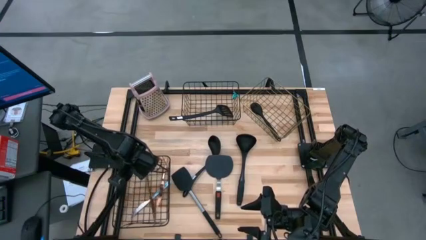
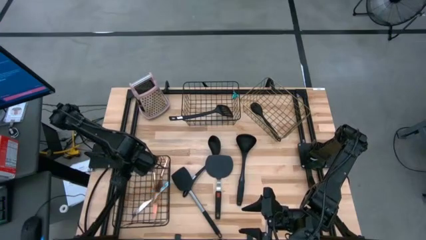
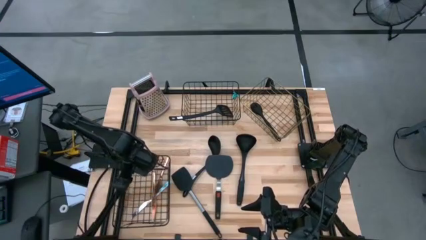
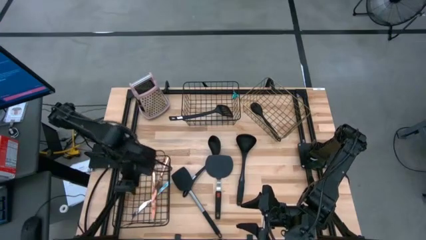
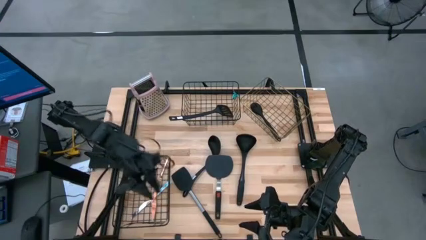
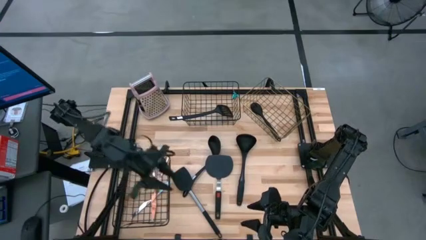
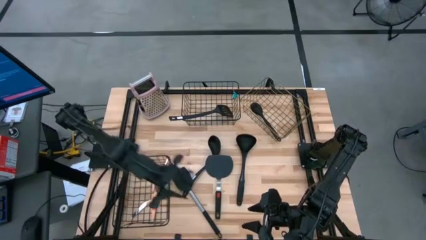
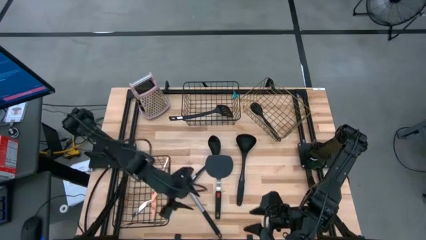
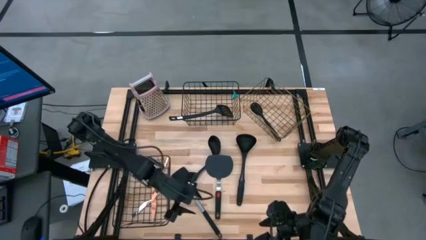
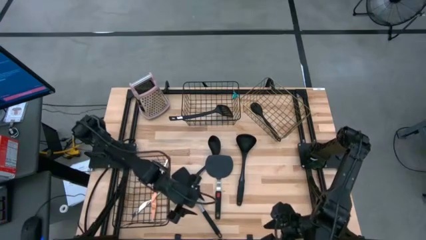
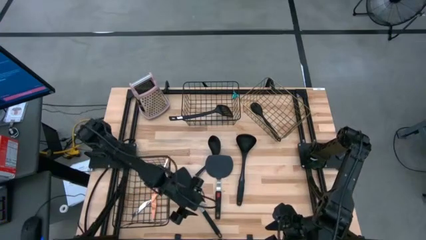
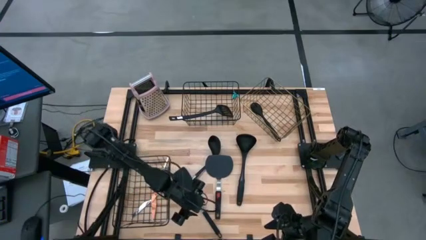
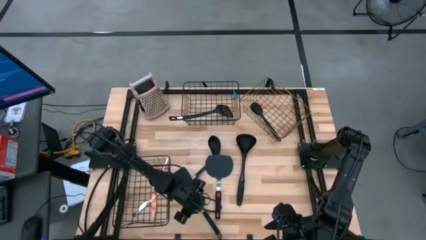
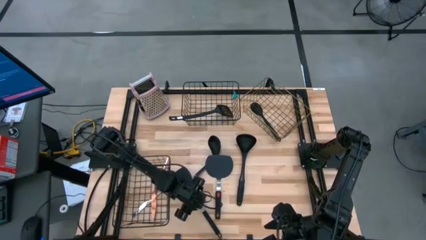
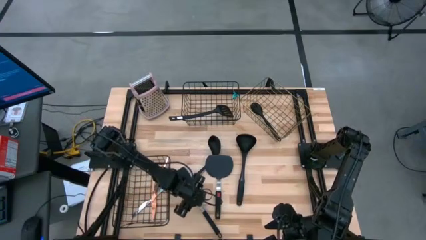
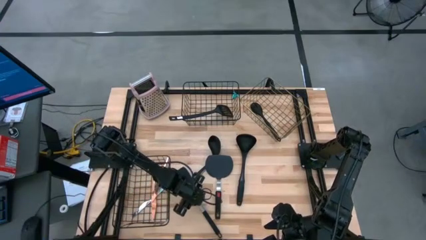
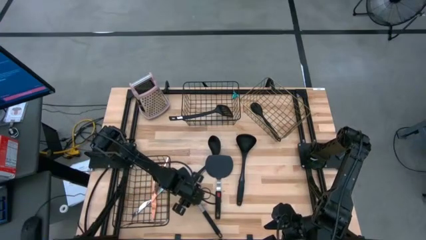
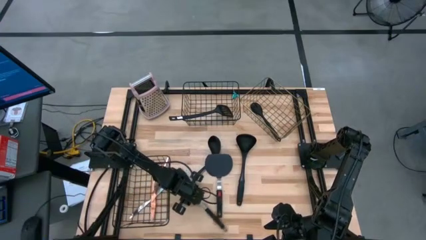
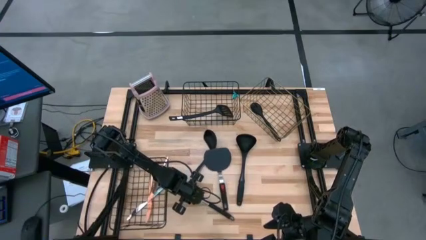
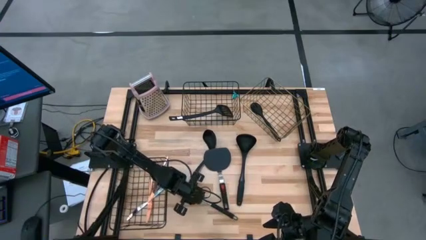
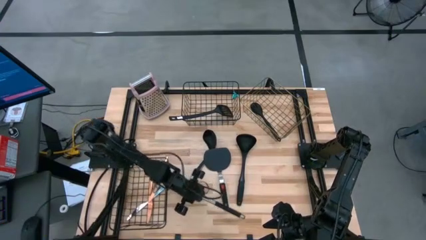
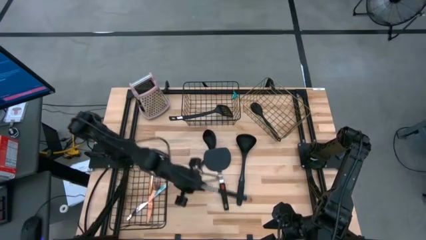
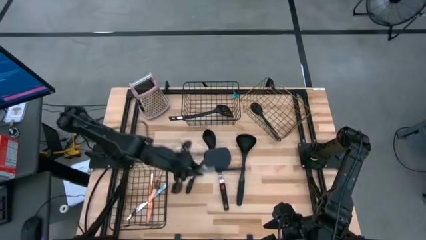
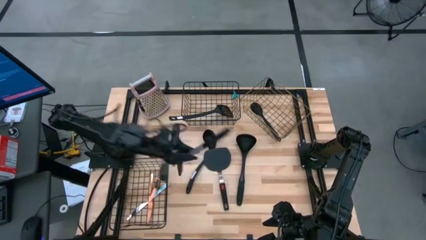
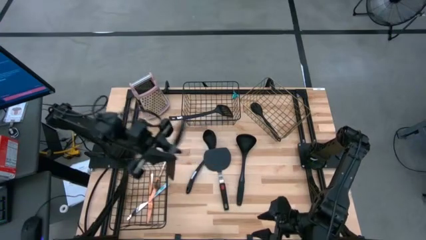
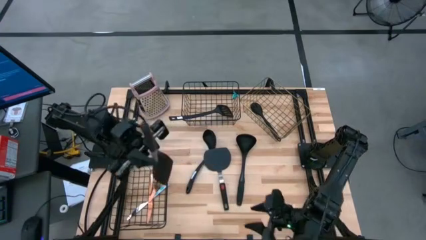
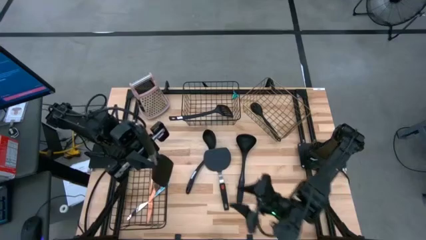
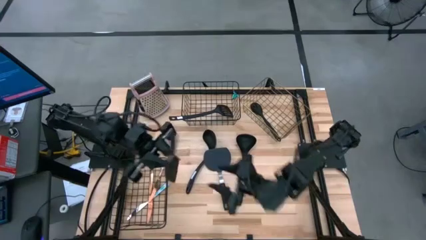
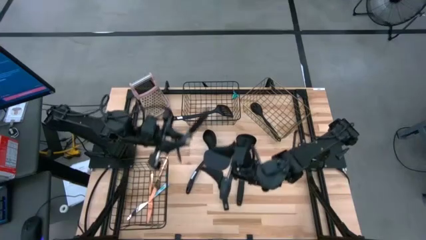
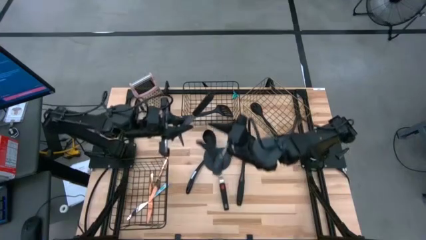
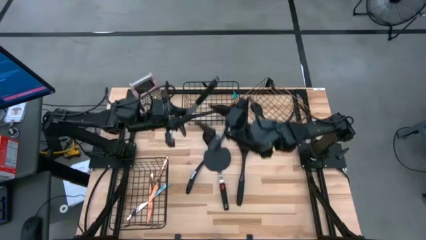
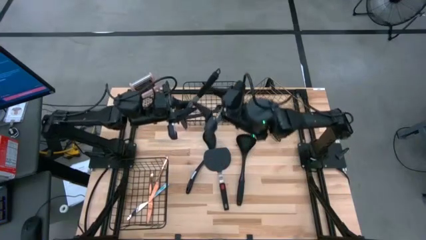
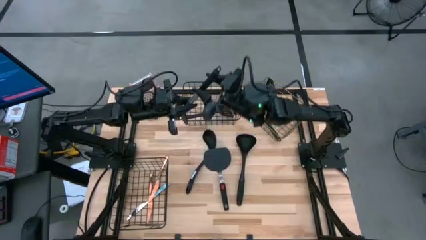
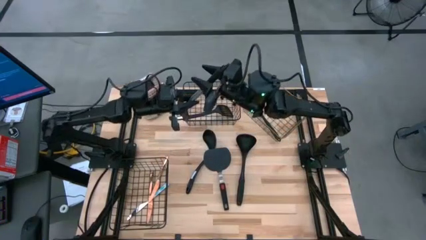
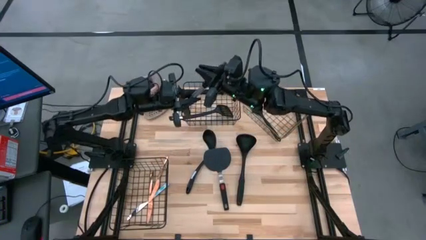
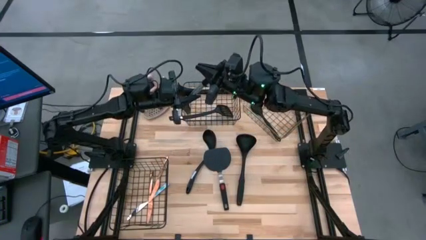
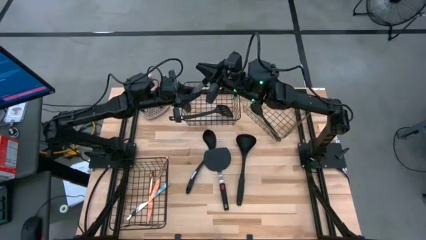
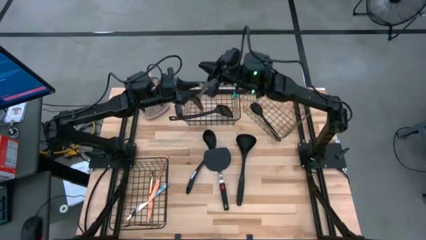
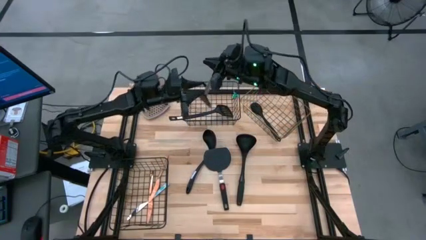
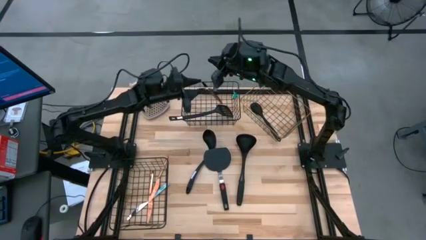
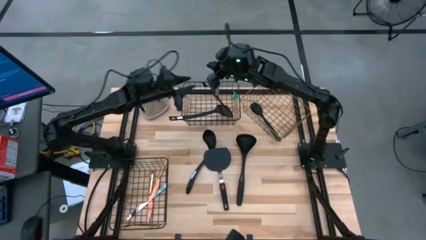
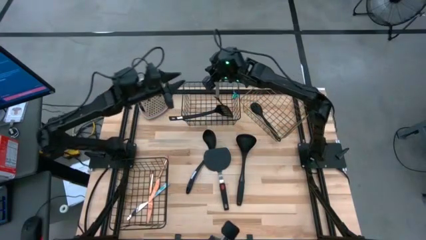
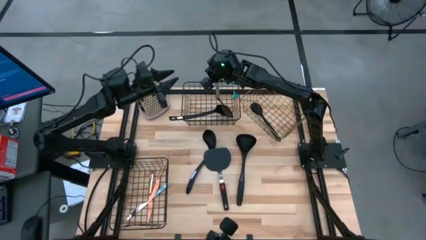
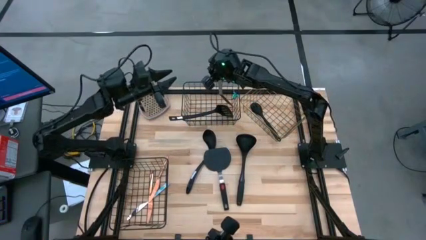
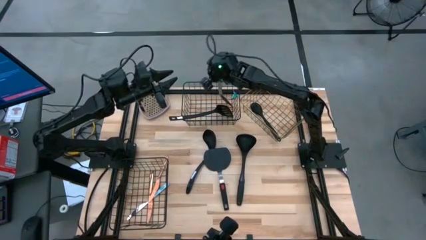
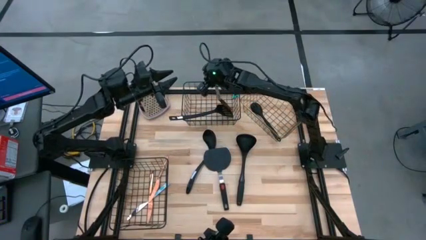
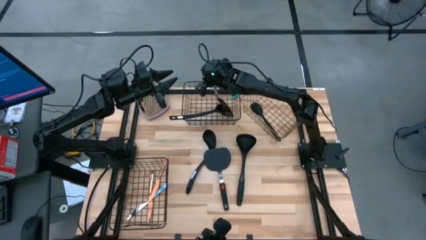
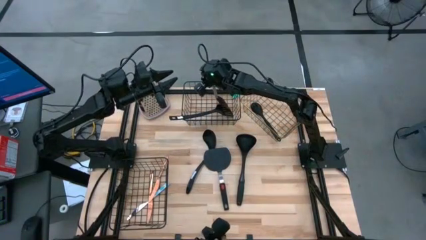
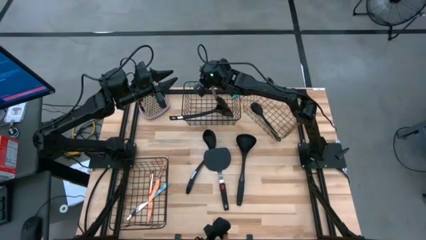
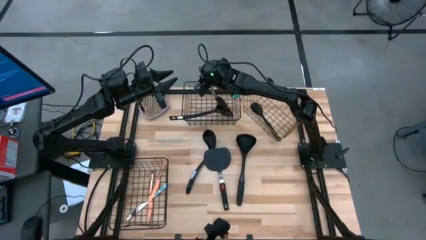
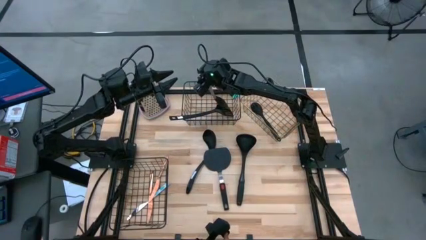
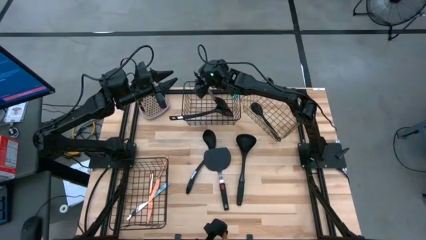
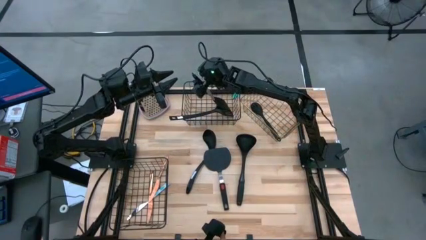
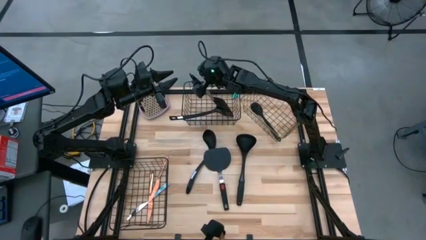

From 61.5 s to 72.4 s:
Task: Pick & Place Kitchen Items
Put the left black spatula into the top left wire basket

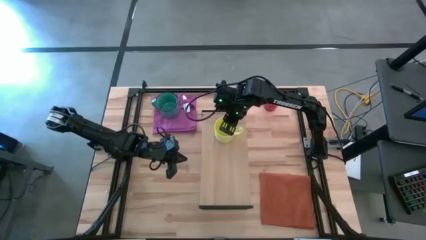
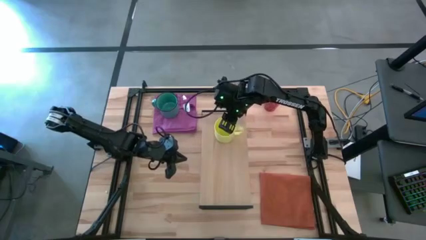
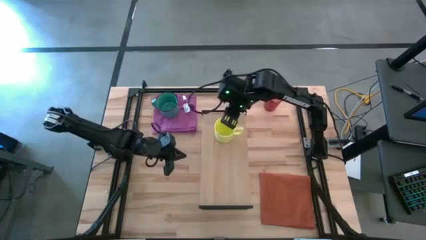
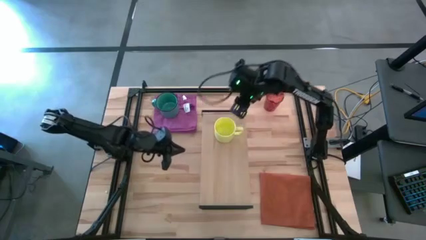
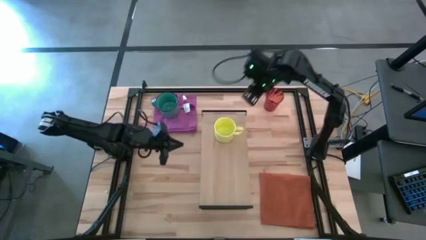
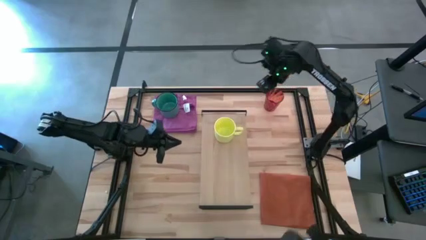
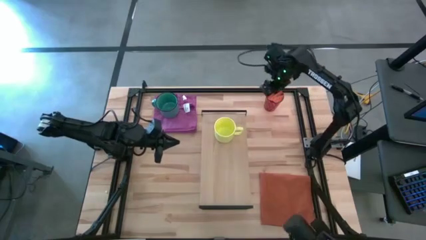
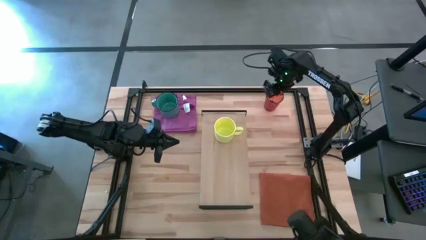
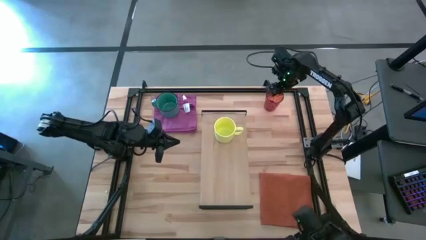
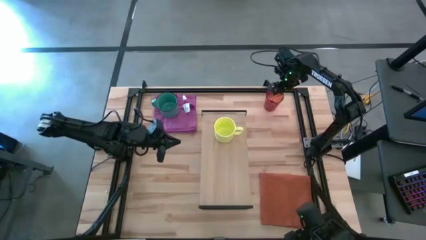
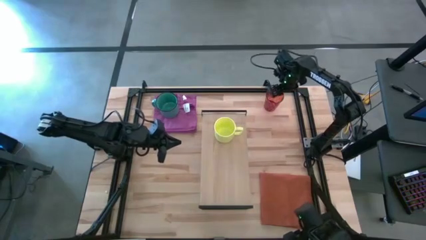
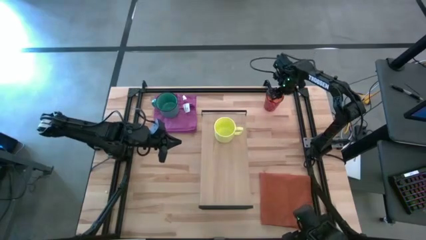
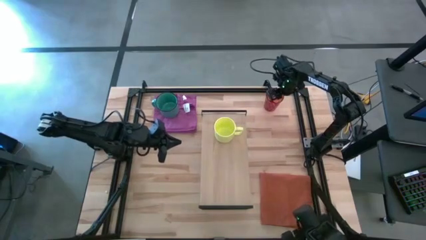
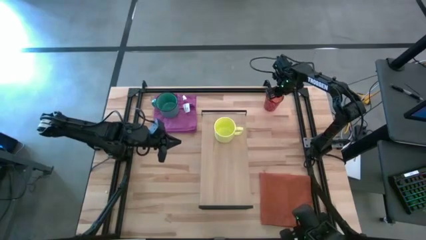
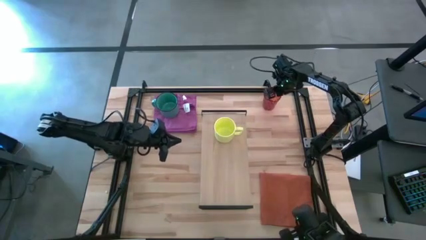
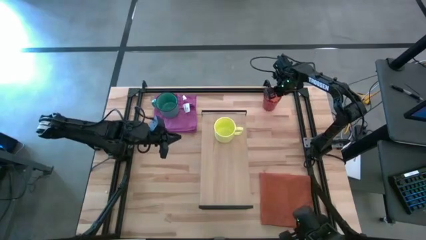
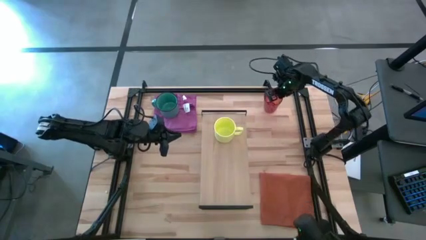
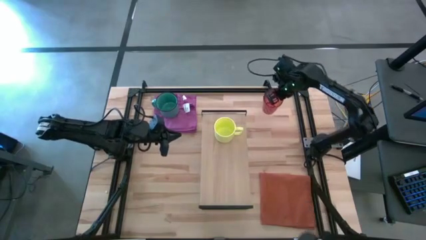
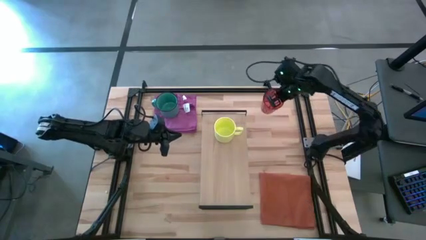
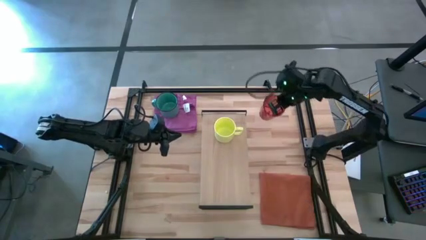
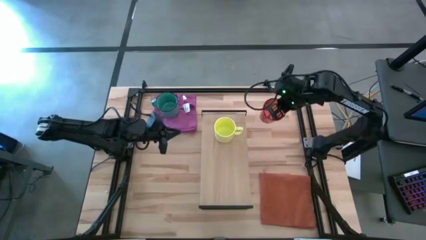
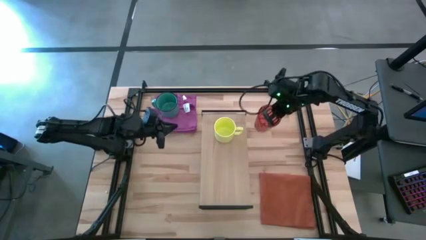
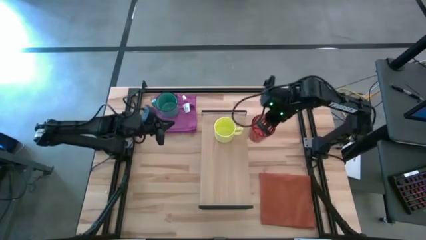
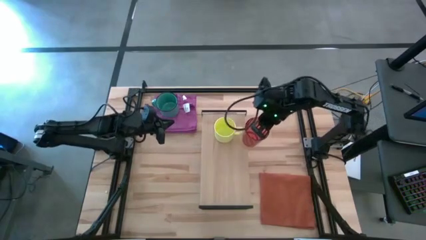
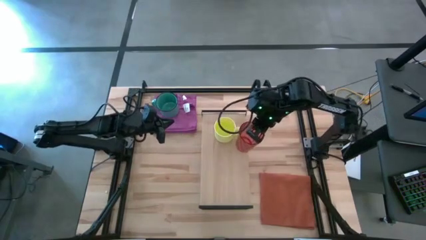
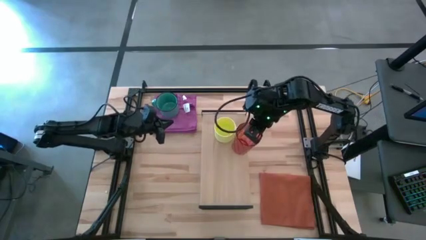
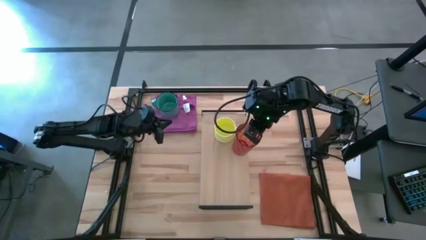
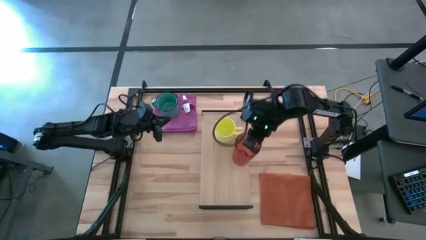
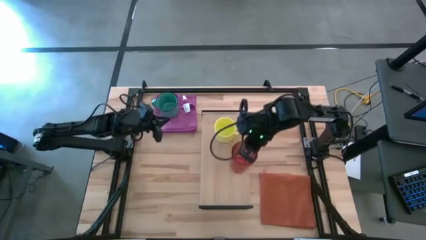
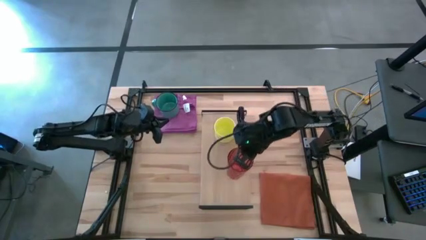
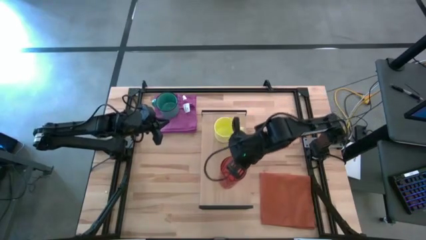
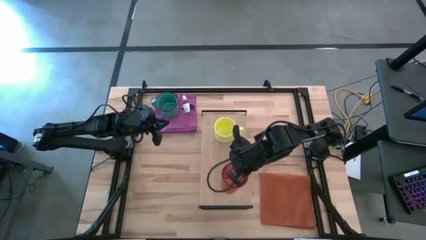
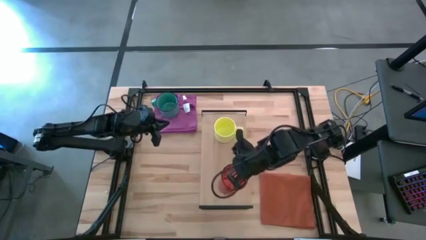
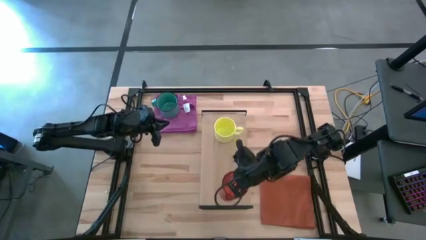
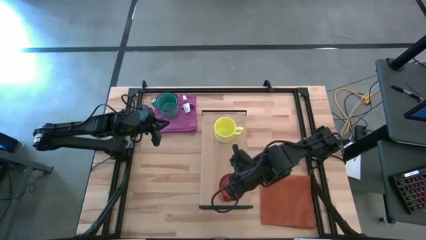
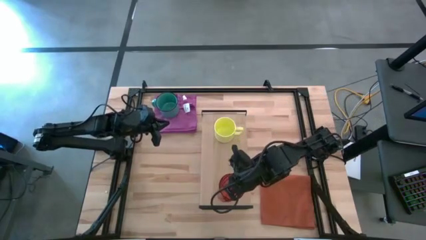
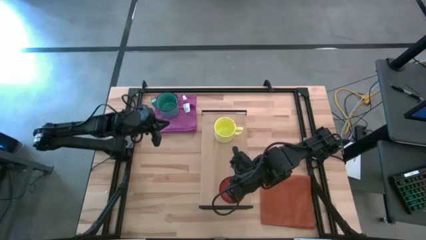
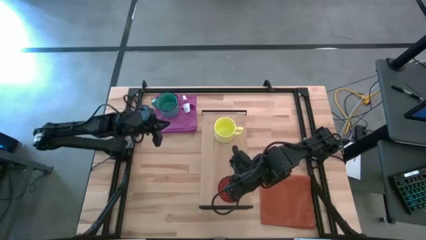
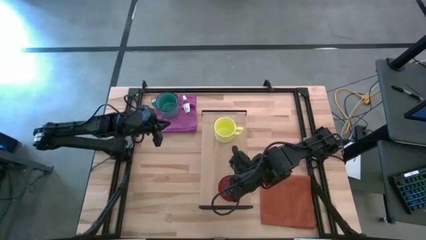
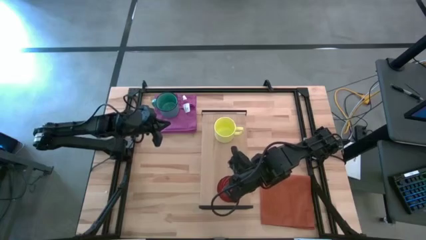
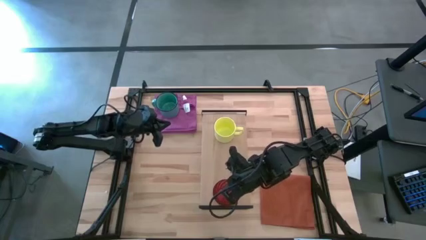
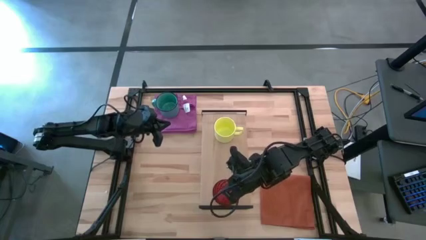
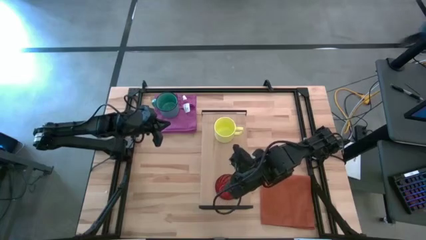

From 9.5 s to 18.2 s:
Task: Stack small to large cups/mugs on shelf
Put the red cup on the shelf
